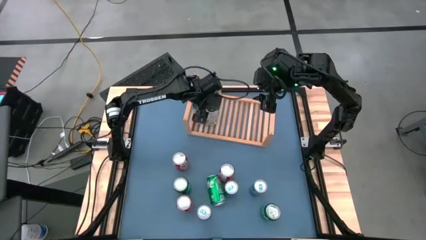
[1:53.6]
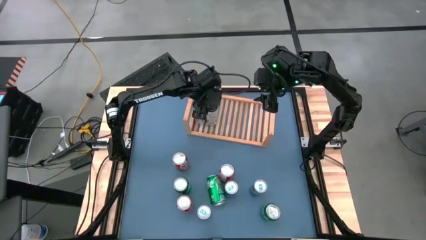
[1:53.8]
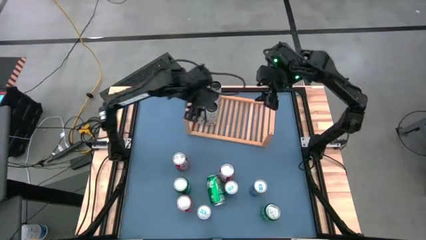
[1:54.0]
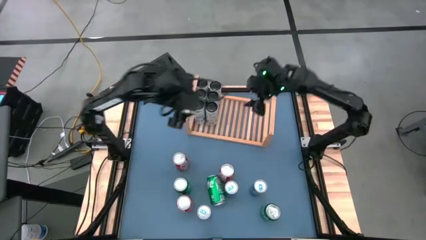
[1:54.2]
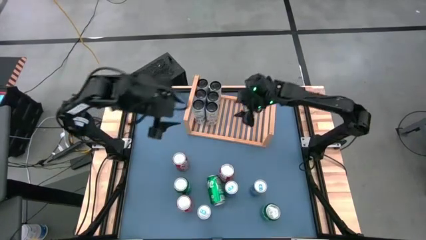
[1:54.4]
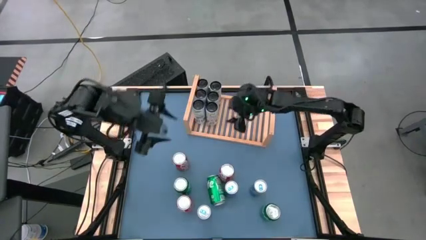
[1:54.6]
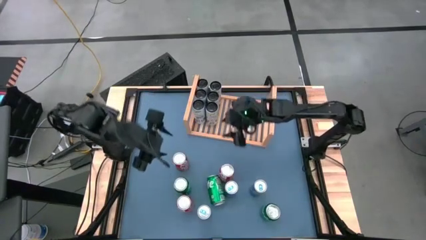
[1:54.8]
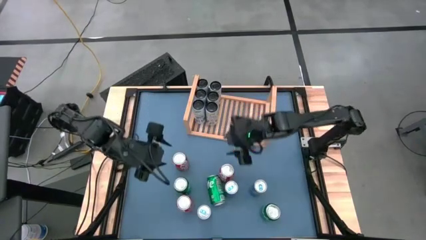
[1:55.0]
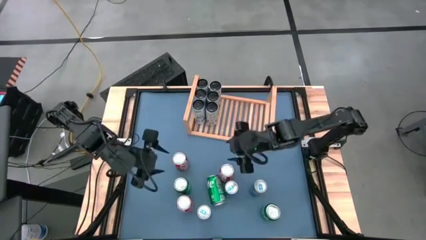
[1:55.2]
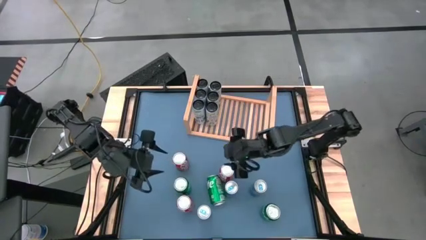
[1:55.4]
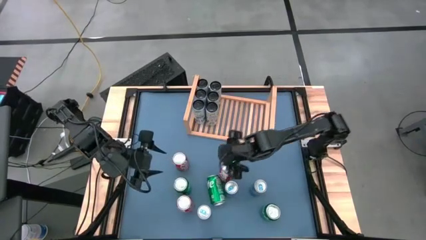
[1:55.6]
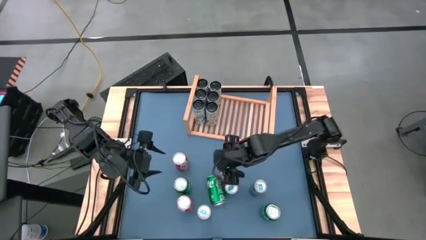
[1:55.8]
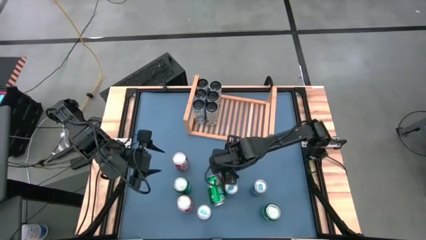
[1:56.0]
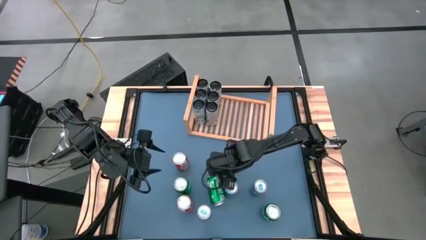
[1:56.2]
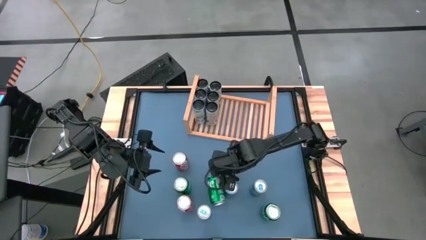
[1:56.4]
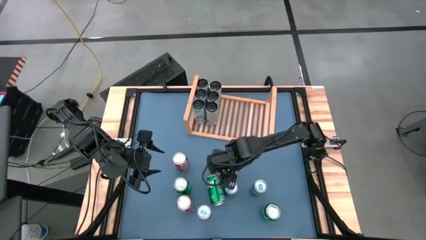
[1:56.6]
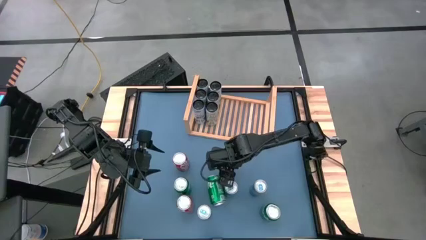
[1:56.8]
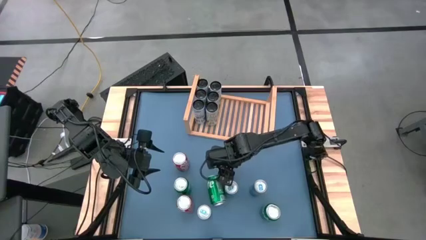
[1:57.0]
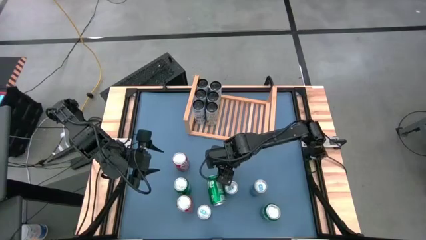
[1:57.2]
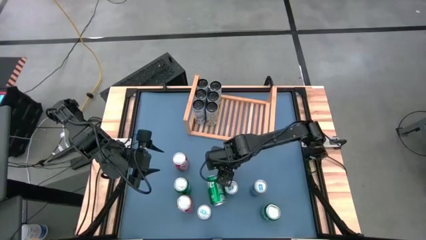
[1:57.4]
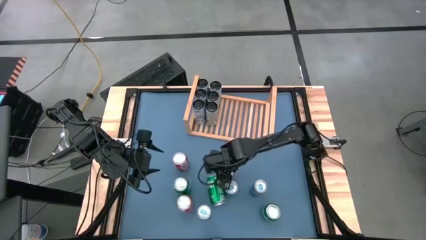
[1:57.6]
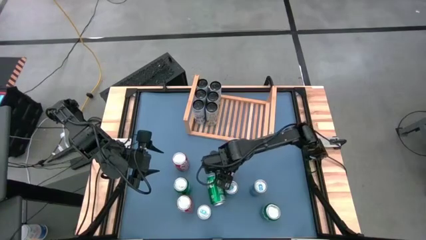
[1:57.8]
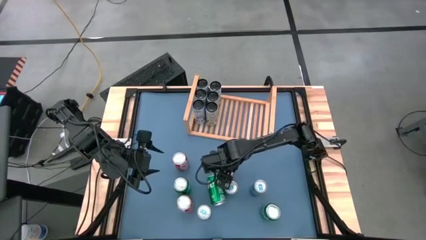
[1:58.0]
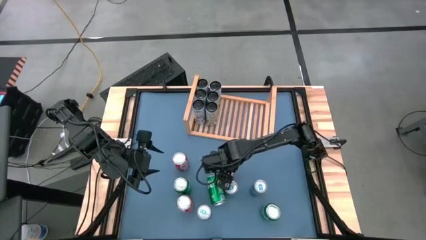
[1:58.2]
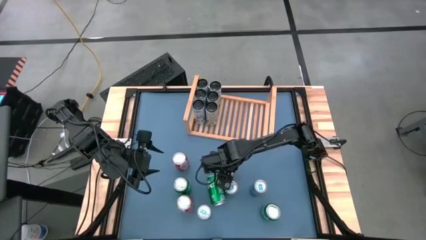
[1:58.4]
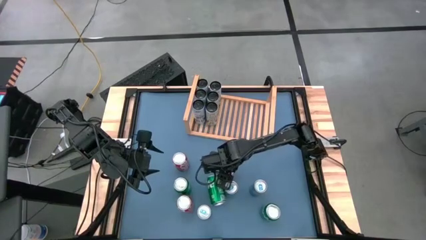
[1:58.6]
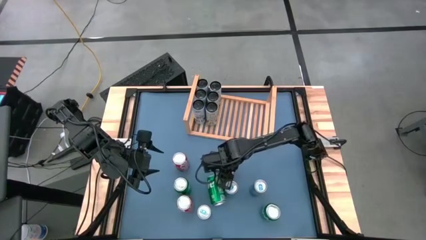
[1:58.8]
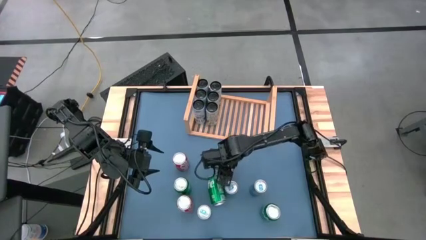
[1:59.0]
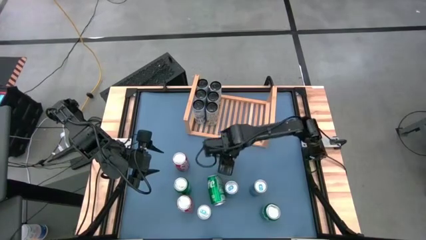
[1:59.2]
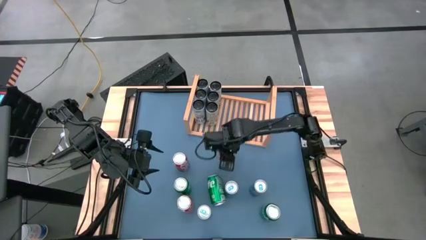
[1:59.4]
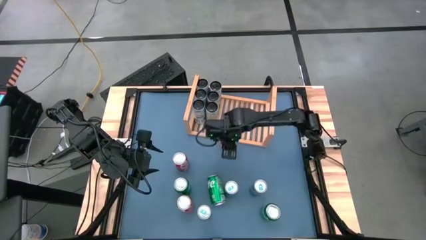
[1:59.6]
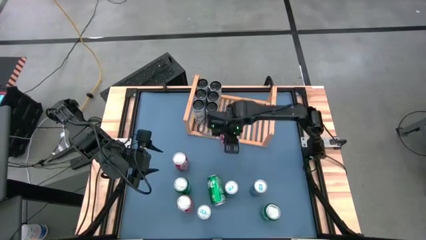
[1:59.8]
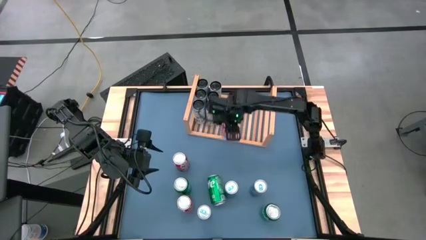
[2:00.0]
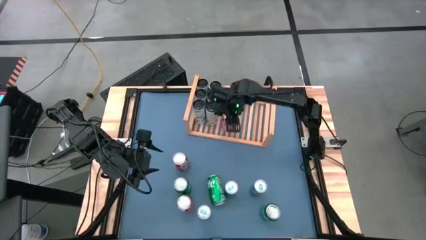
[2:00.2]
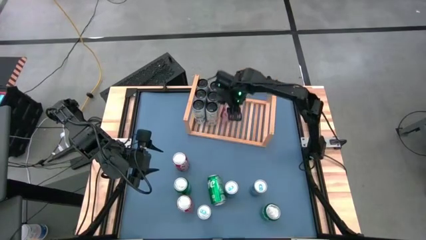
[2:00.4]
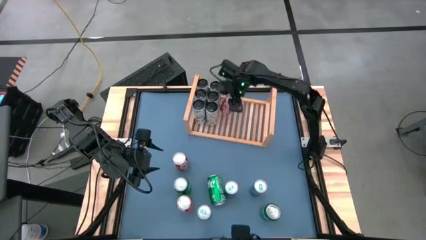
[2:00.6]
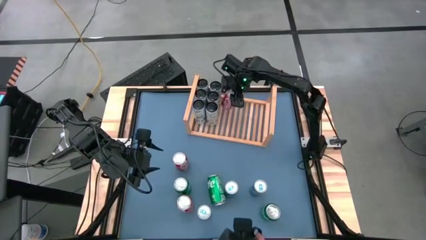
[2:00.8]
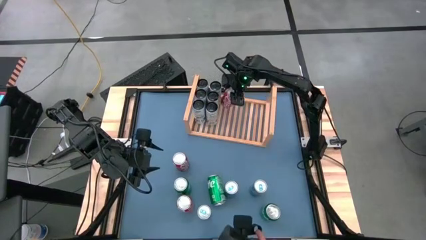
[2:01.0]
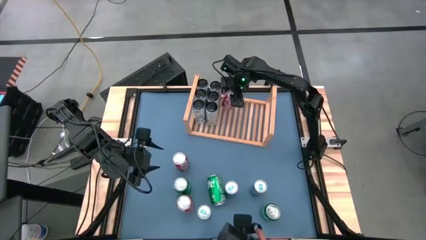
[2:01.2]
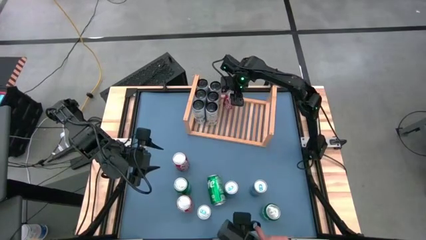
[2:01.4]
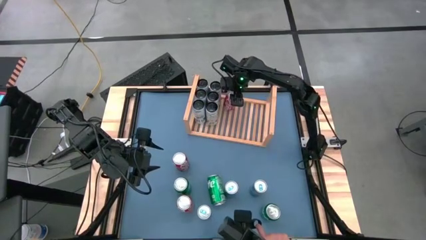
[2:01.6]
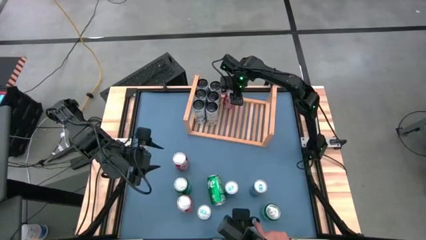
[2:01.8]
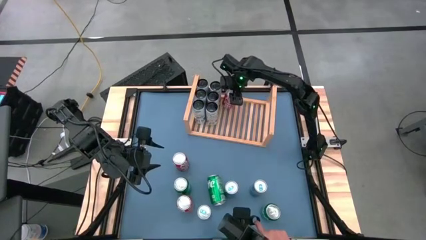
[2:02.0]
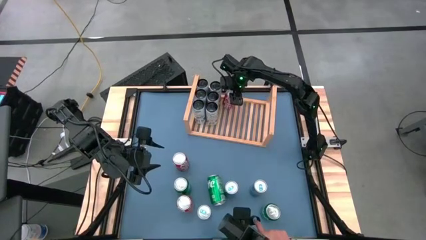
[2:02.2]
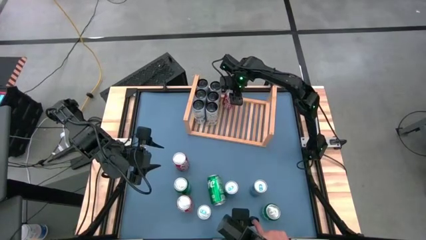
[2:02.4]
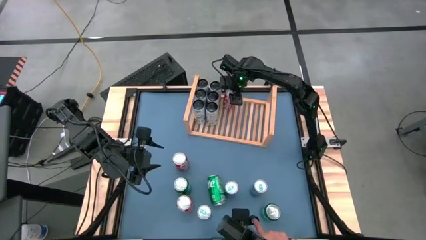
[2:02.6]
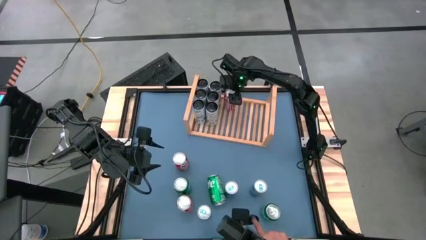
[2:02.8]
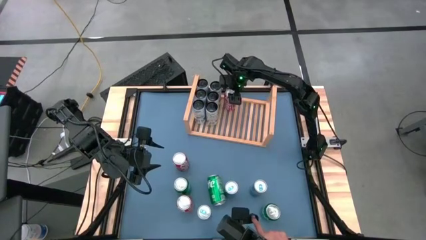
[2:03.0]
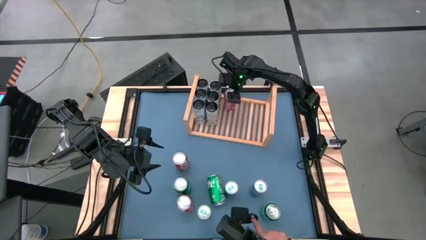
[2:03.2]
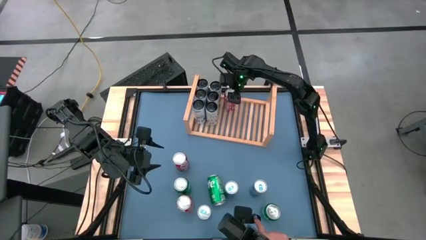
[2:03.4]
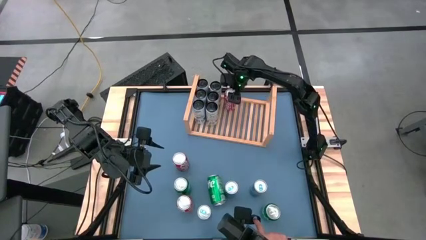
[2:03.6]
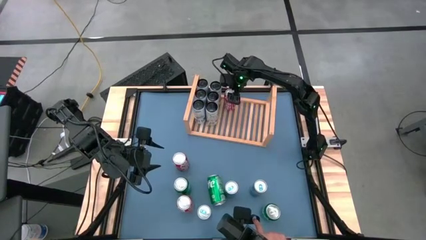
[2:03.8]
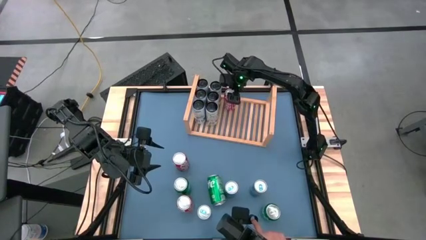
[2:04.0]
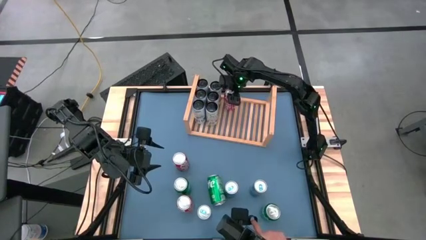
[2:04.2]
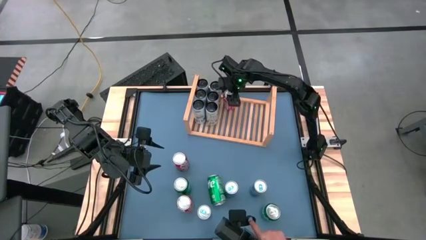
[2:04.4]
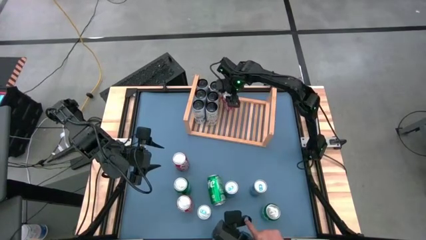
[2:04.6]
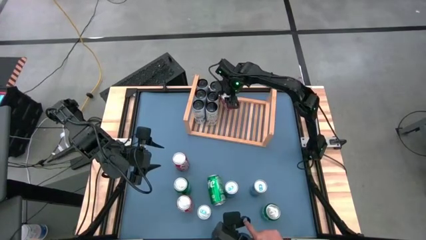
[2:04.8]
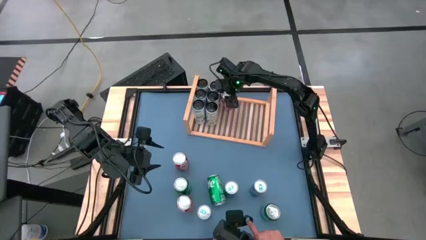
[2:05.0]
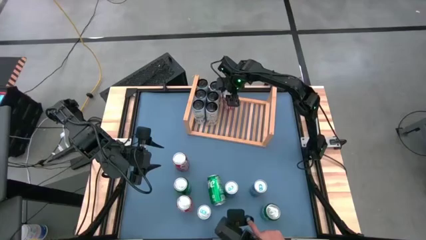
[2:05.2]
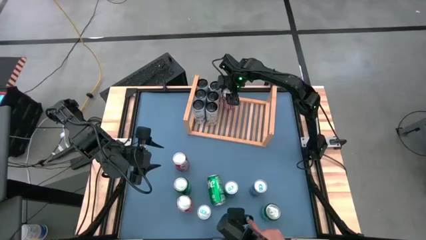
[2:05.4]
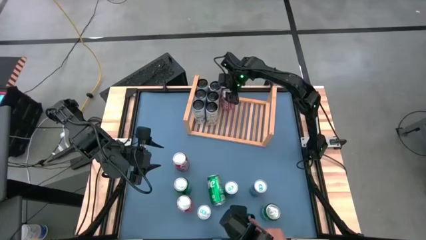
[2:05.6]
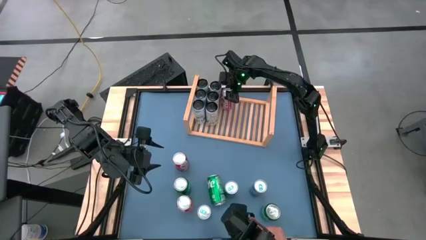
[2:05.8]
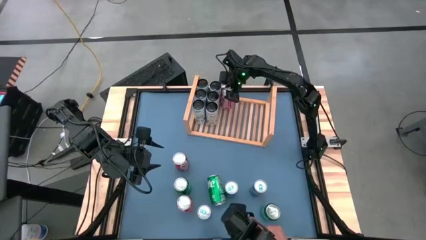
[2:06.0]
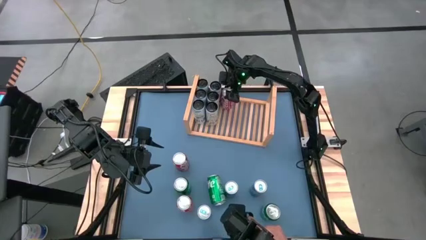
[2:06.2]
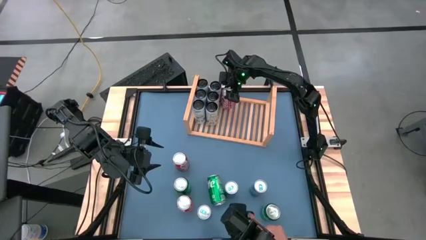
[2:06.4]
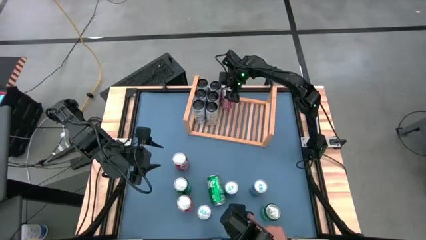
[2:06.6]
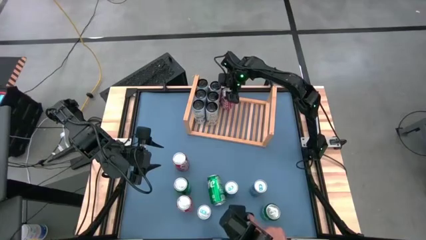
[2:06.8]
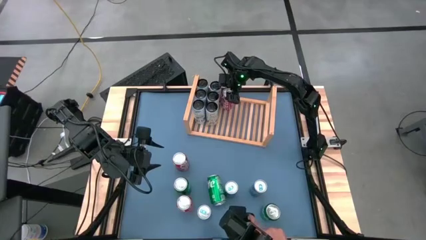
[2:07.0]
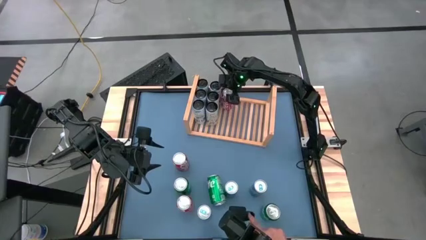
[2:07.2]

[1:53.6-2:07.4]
Task: Place canned beverage on shelf
Put the red soda can on the shelf

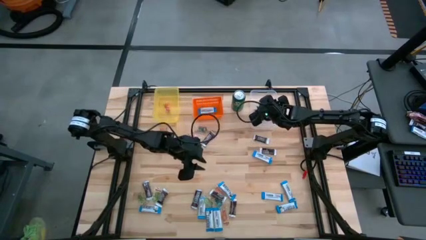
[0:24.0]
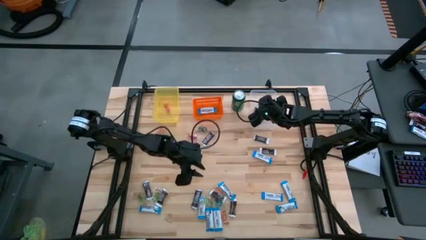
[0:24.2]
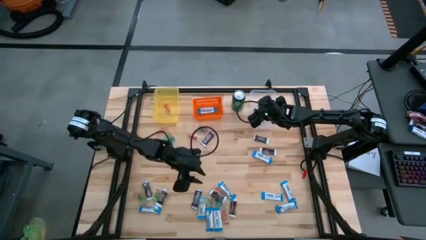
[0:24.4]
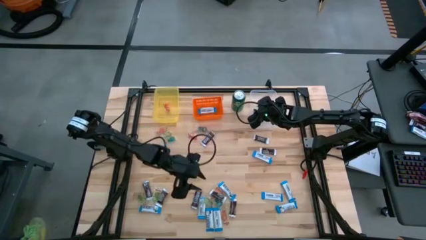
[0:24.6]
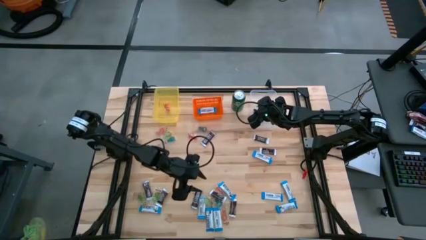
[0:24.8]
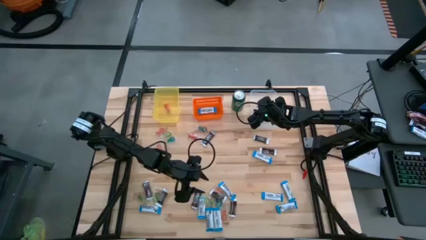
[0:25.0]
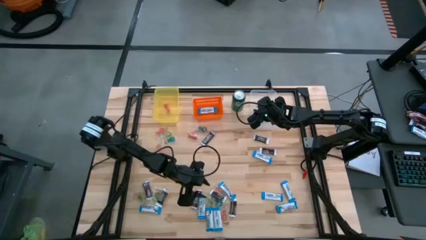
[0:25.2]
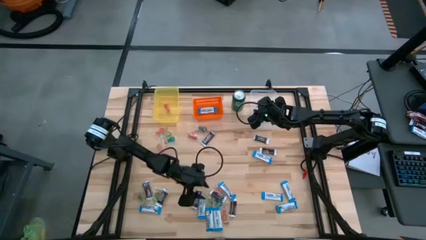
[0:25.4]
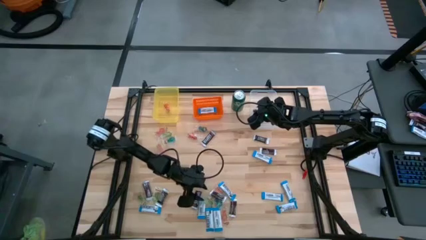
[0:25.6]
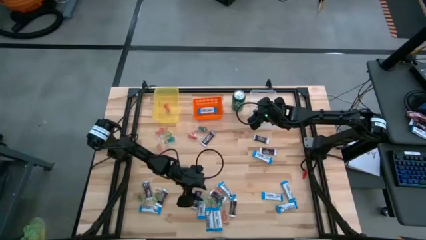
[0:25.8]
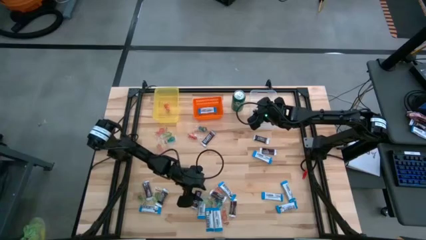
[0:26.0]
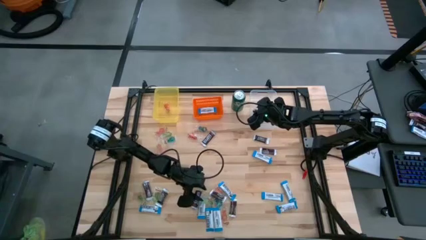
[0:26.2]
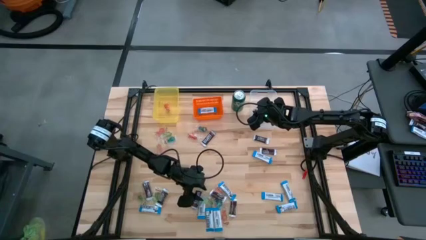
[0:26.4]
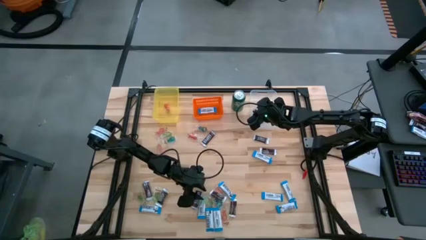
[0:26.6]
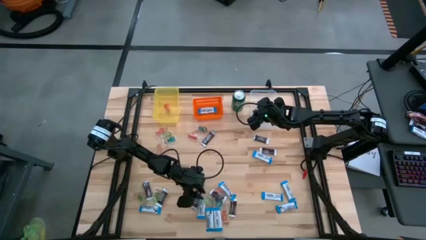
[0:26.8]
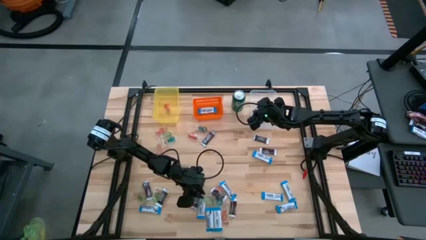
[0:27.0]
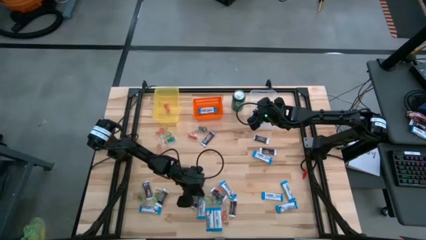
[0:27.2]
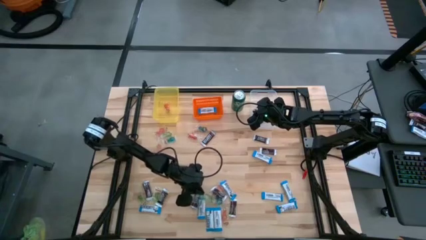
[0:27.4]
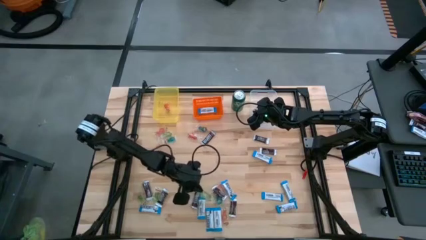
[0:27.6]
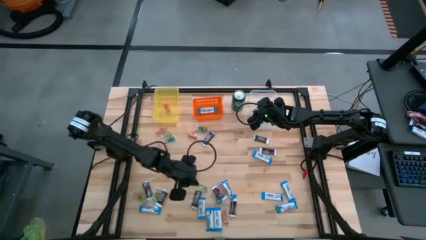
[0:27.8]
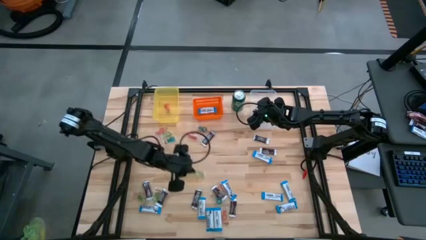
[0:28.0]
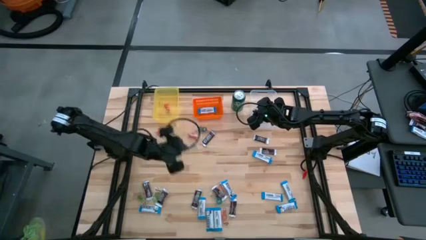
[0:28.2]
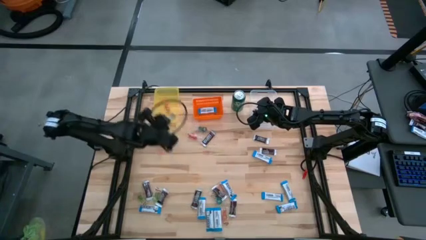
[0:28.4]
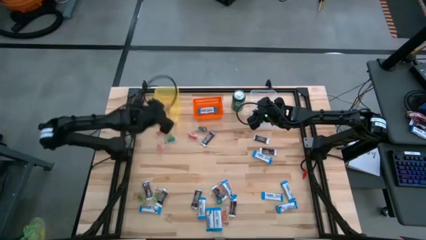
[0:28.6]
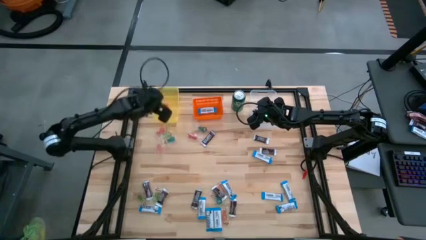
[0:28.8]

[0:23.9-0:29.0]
Task: Organize candy in baskets
Put the green gummy into the yellow bin
